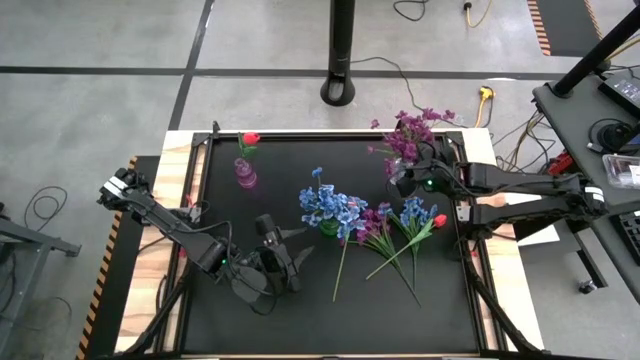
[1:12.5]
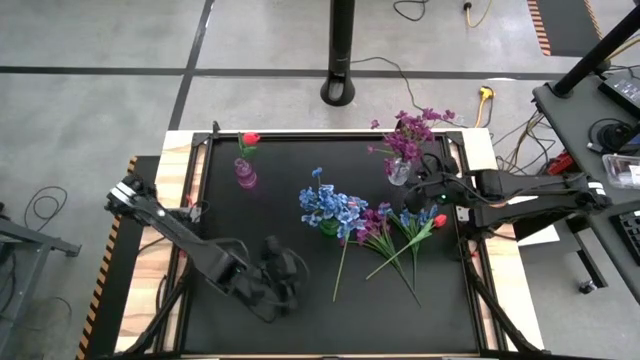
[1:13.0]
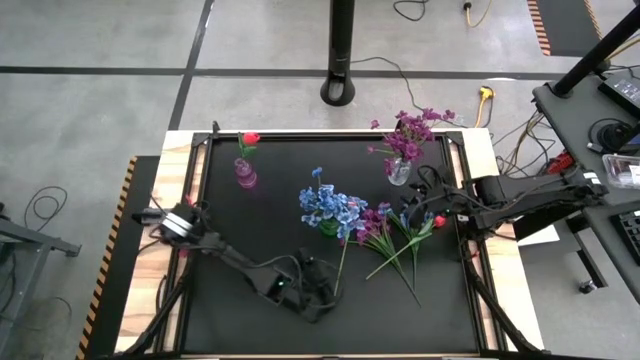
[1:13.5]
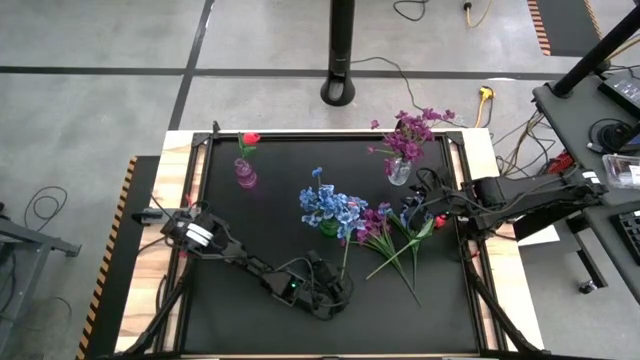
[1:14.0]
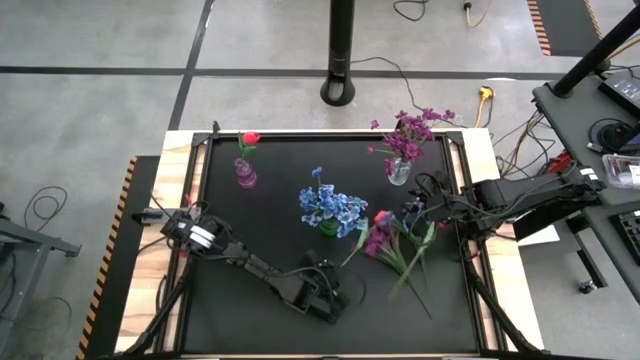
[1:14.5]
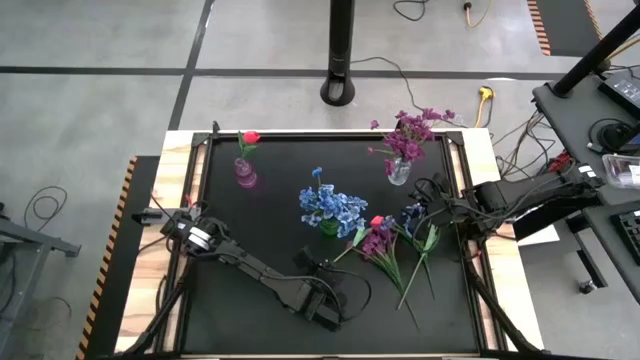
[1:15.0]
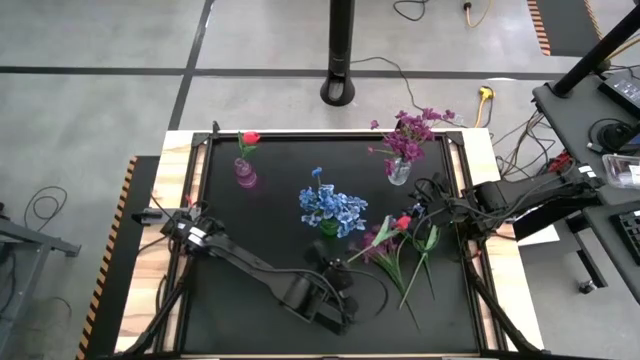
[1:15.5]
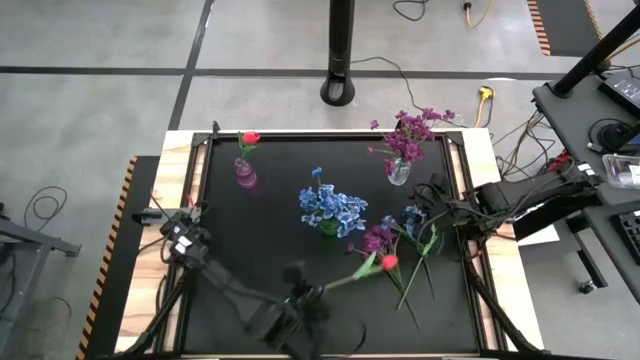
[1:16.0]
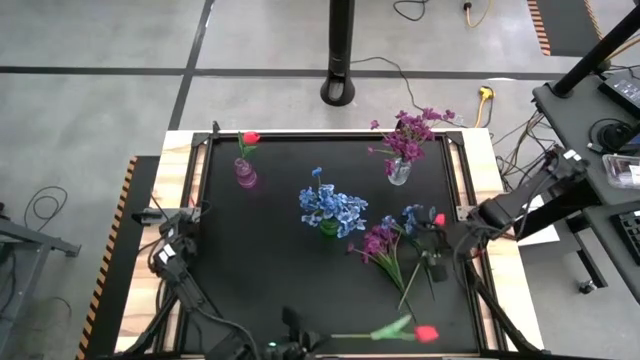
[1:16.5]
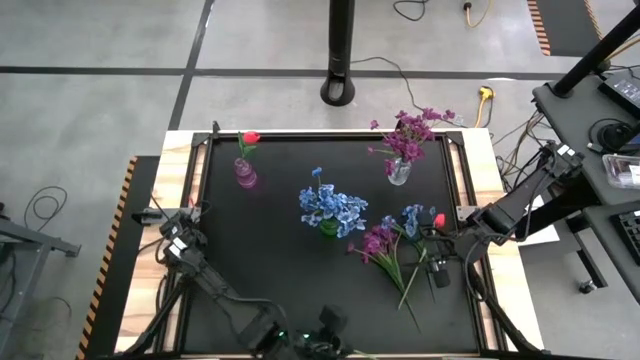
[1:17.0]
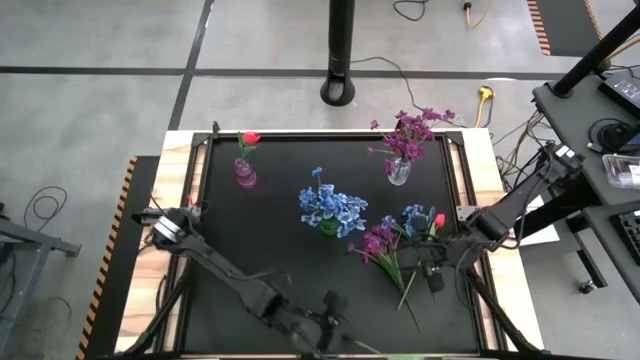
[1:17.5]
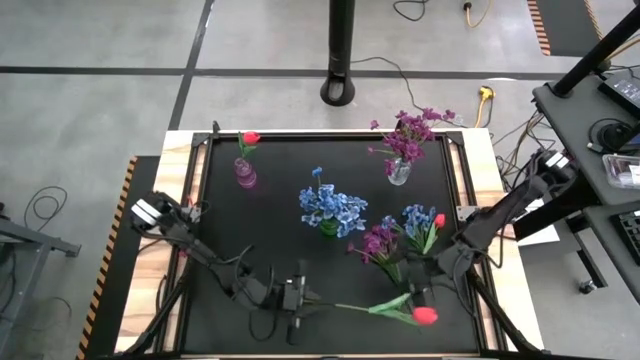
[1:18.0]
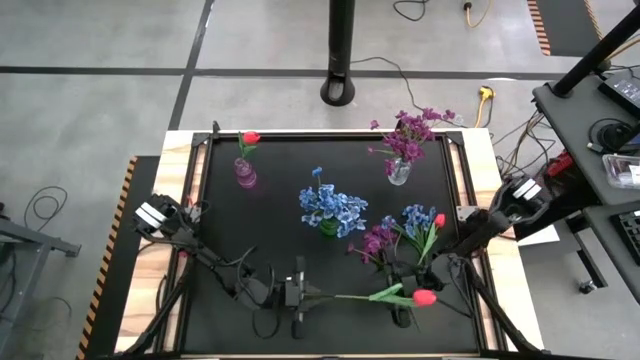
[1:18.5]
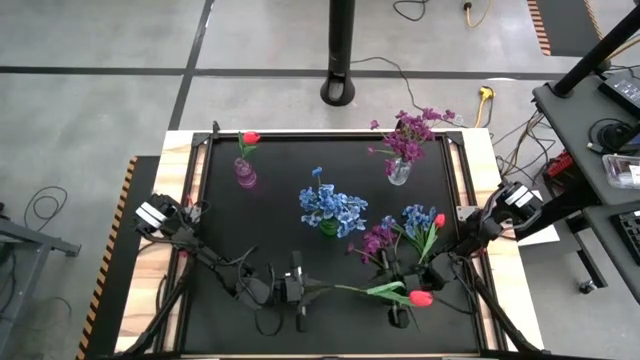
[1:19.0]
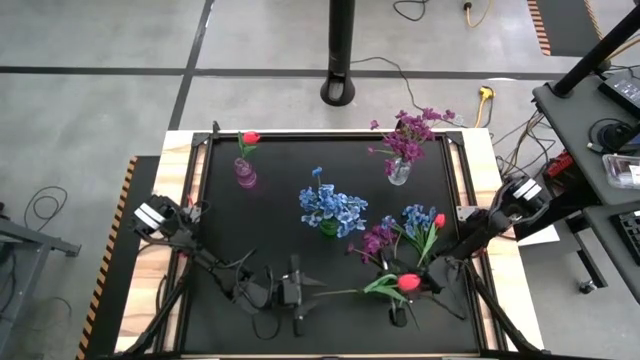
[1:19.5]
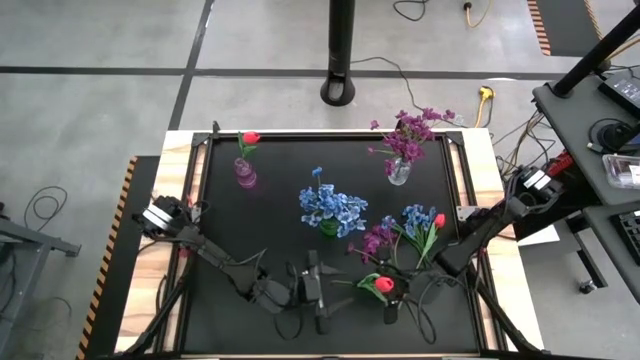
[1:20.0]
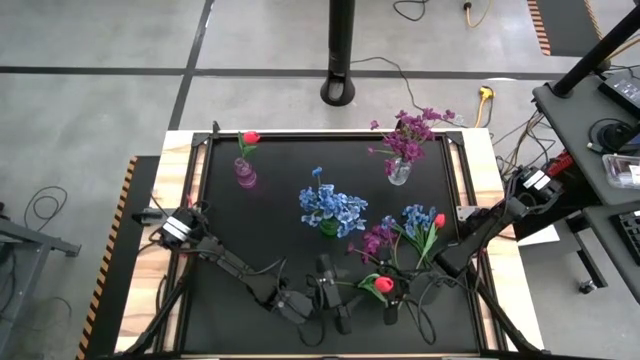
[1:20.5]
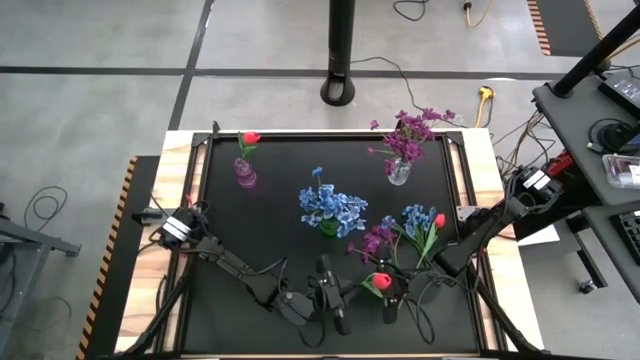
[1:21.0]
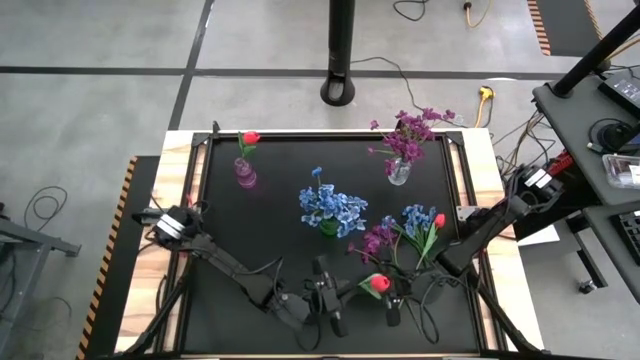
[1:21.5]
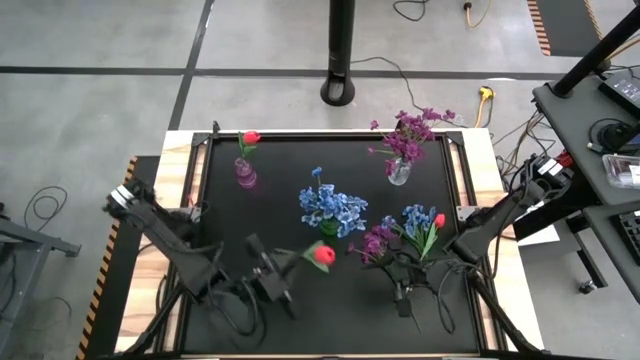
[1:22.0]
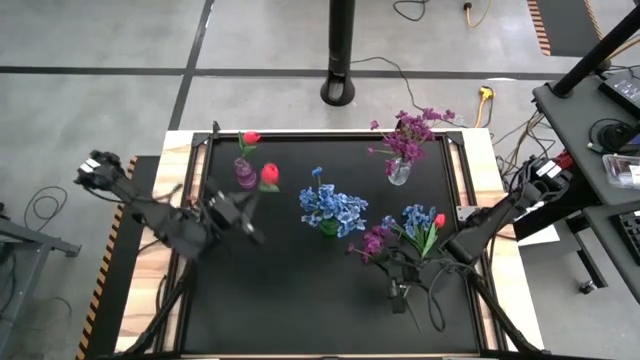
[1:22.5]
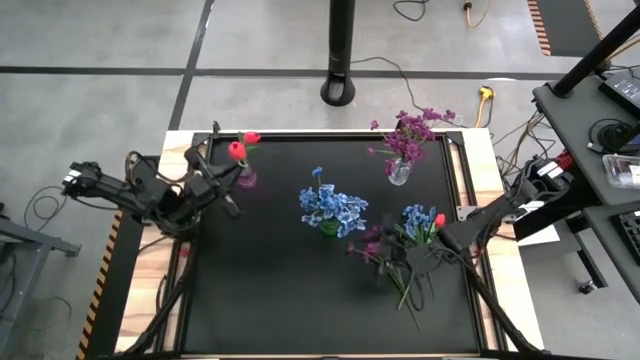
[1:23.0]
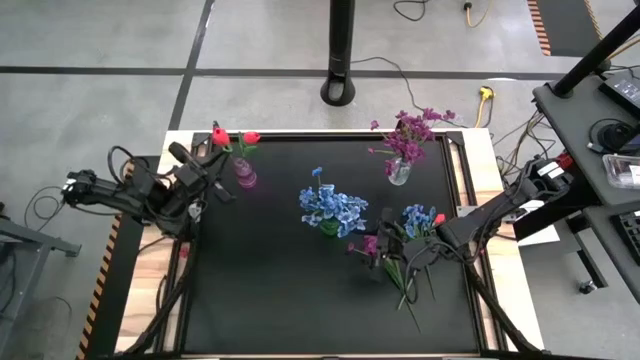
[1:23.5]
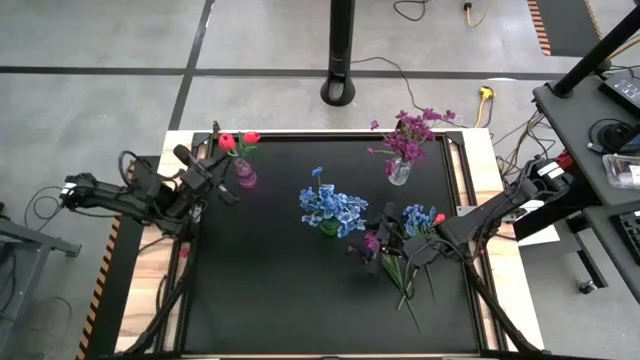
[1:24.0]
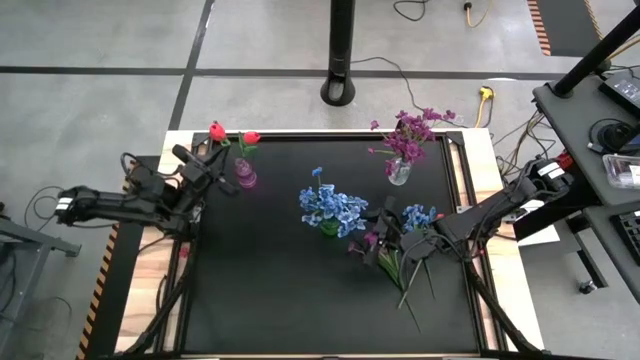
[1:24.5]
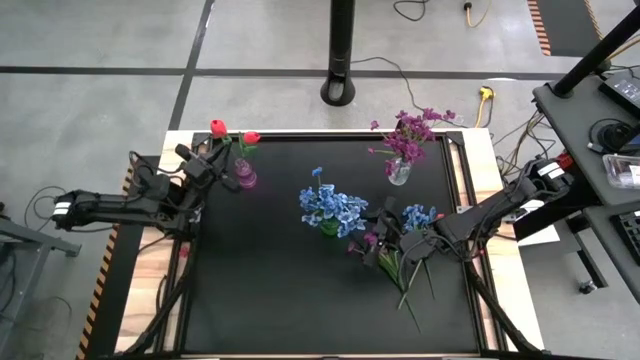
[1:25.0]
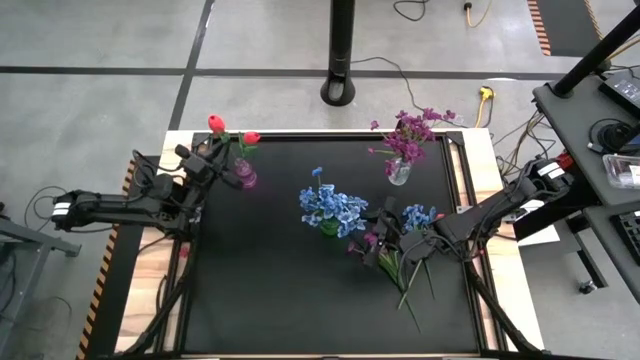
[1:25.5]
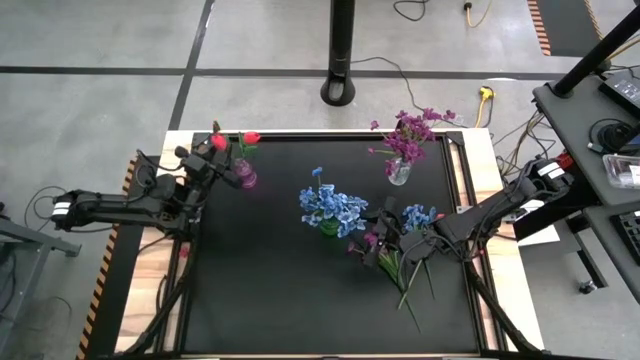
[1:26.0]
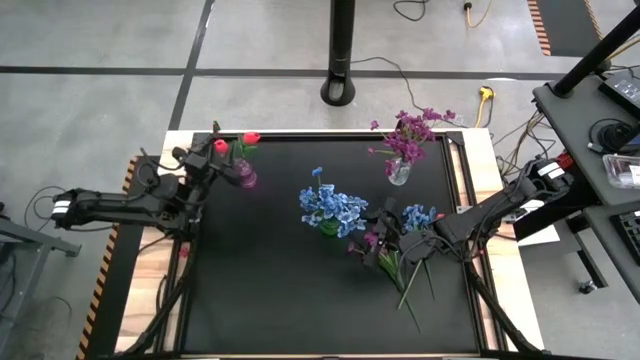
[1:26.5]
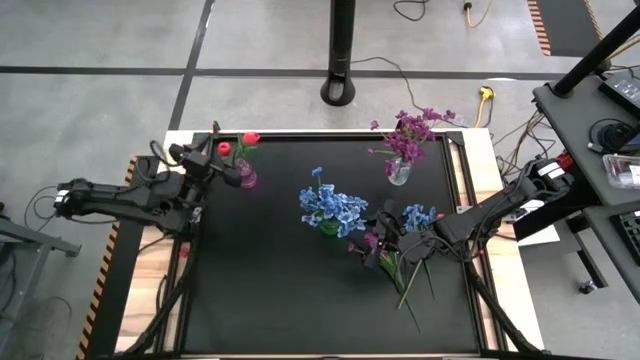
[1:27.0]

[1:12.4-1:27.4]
Task: Sort flowers into vase by color
Put the left pink tulip into the violet vase

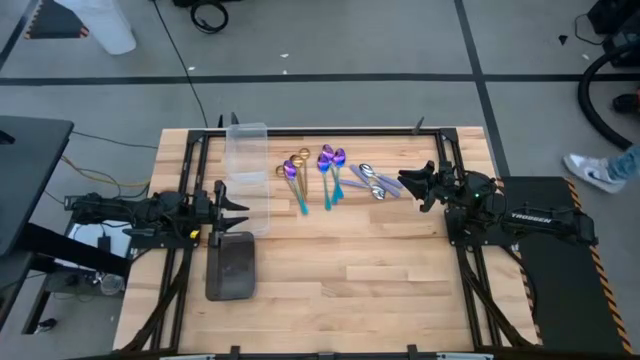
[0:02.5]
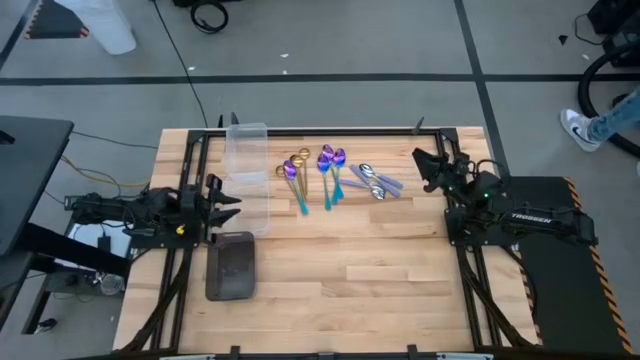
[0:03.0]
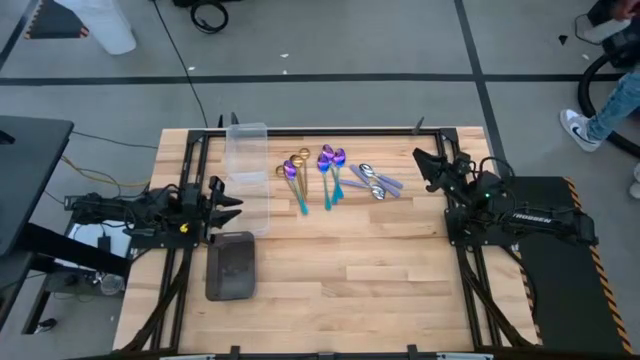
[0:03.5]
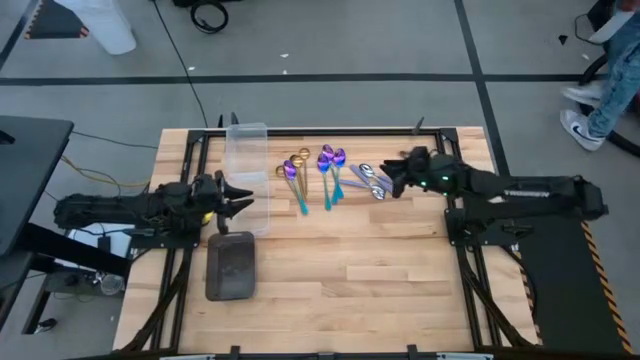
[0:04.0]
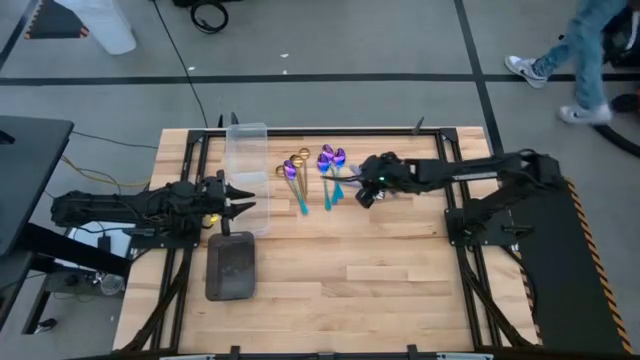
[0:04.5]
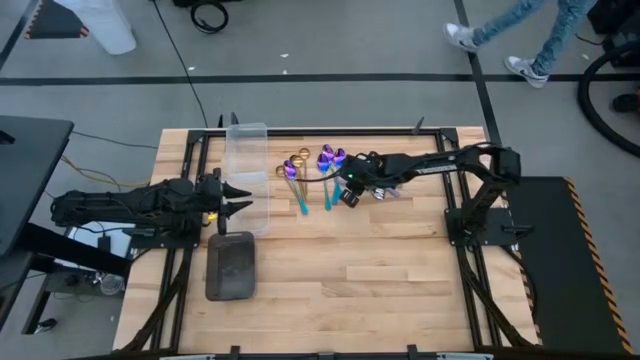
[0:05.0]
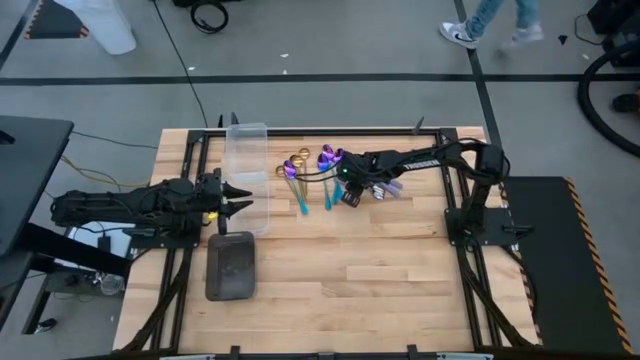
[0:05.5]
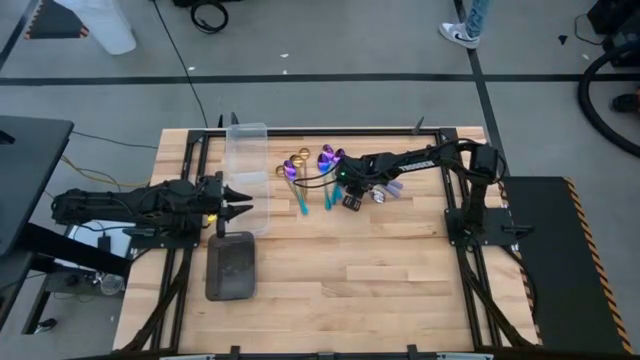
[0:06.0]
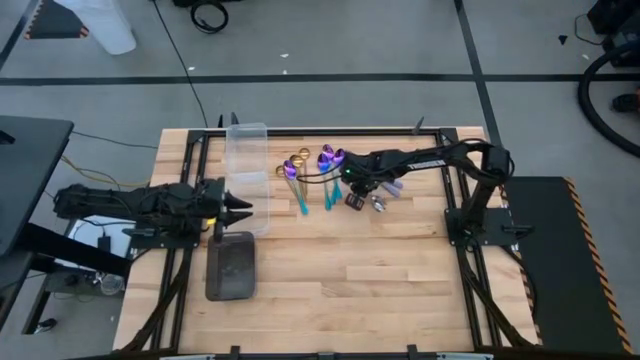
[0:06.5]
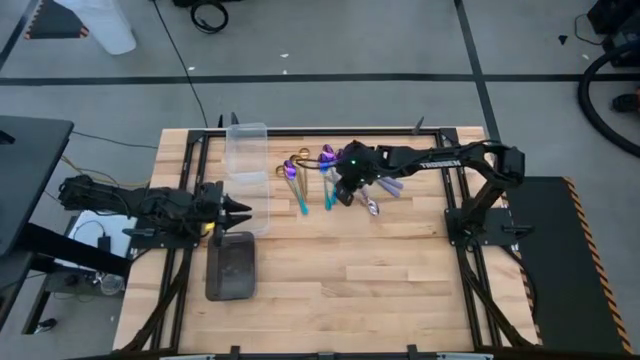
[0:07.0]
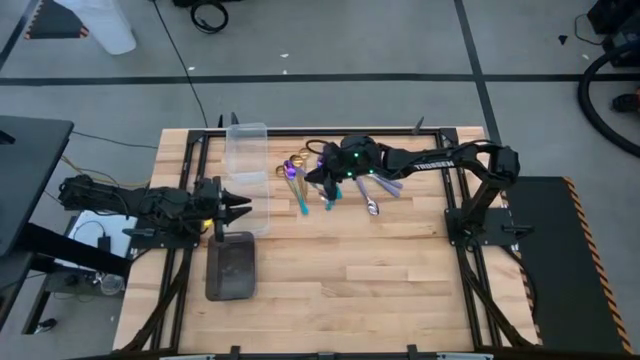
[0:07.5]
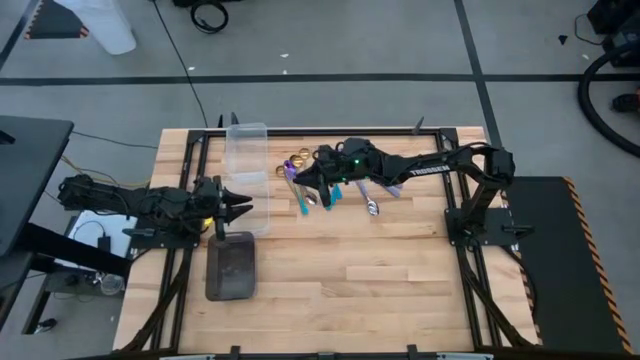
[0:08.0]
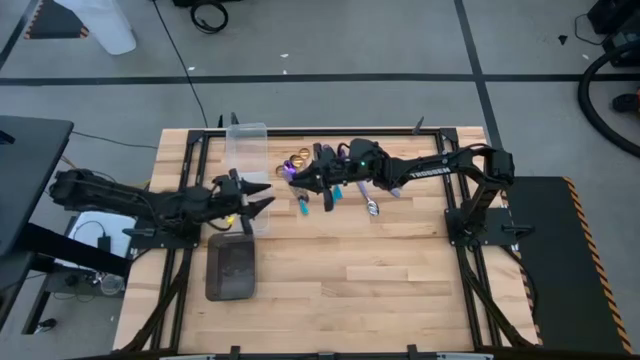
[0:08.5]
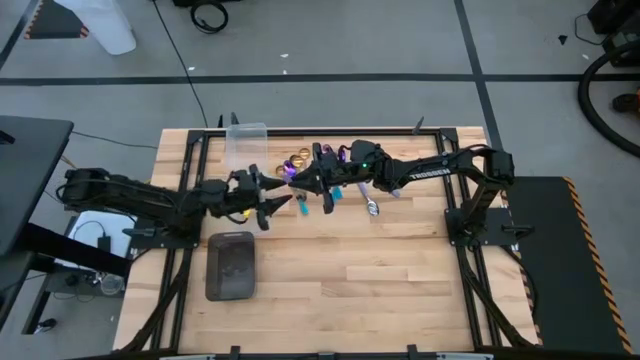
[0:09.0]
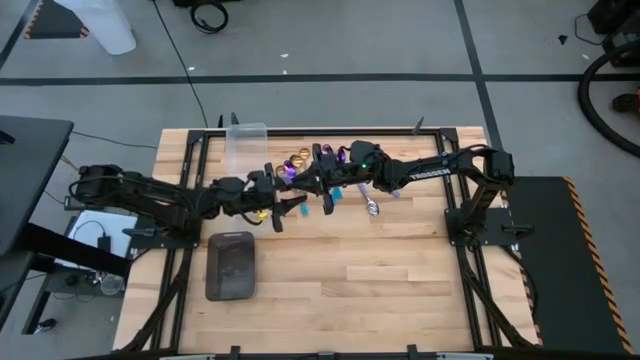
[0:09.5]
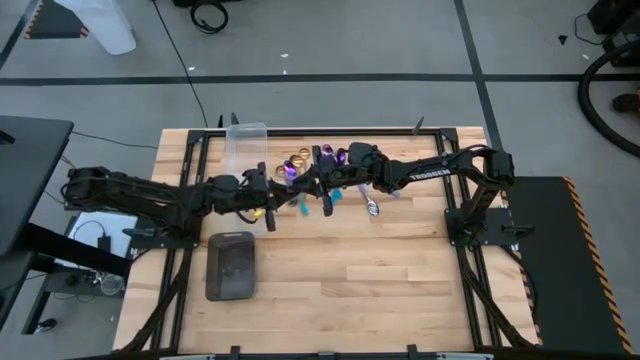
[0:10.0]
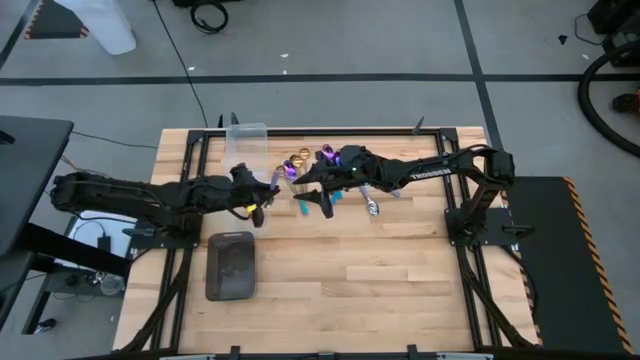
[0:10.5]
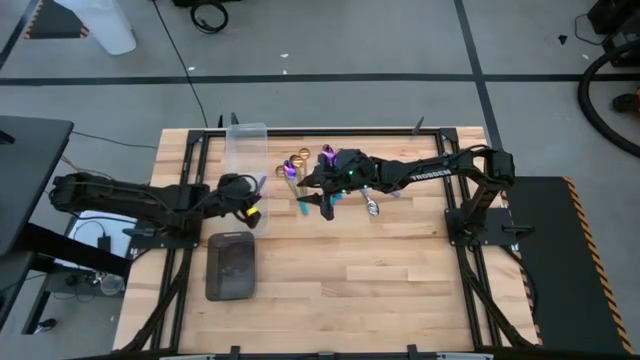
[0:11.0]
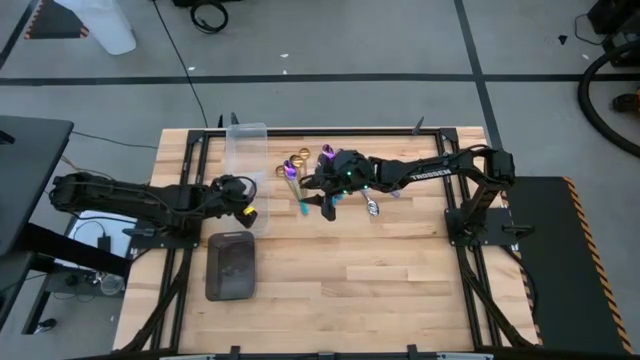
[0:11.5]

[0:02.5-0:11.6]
Task: Sort silverware by color (type)
Put the blue spoon into the bottom transparent bin
